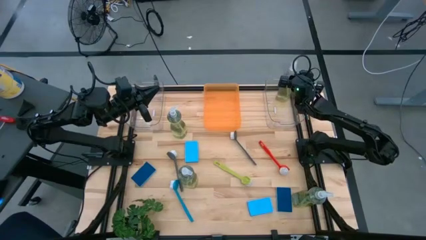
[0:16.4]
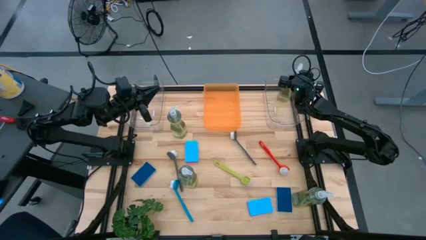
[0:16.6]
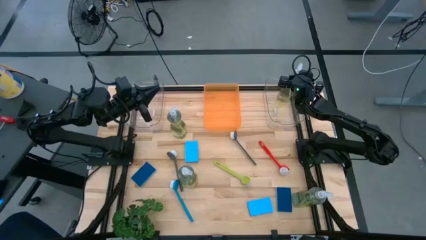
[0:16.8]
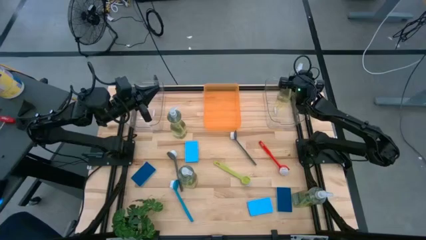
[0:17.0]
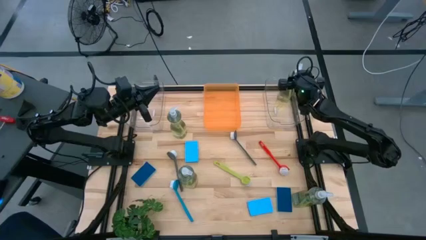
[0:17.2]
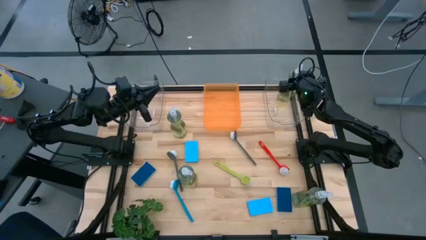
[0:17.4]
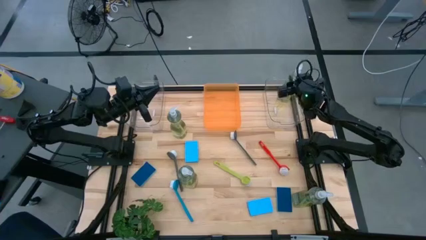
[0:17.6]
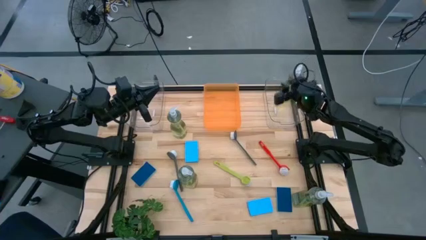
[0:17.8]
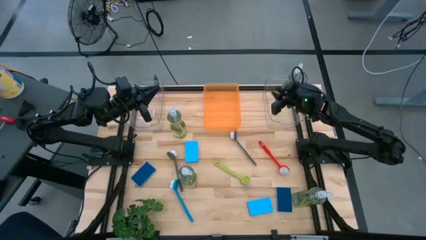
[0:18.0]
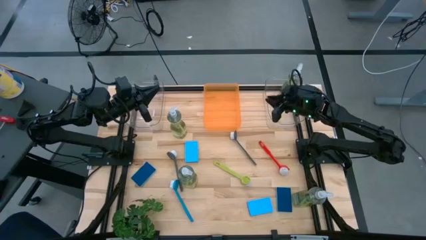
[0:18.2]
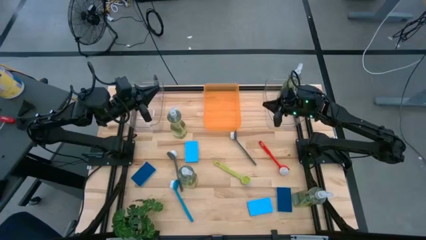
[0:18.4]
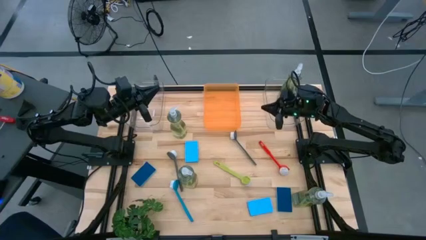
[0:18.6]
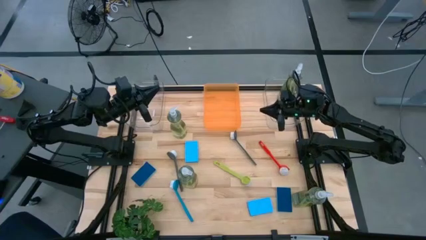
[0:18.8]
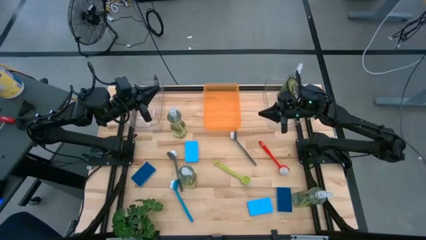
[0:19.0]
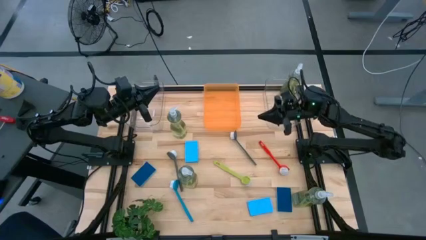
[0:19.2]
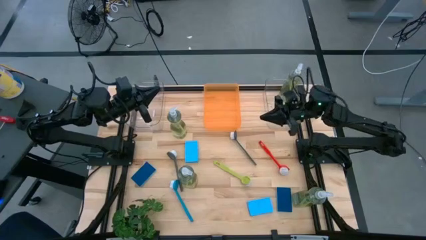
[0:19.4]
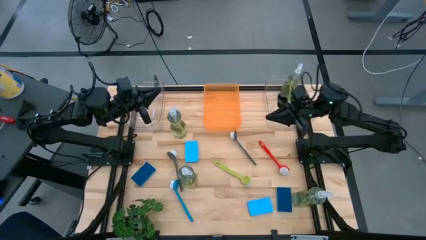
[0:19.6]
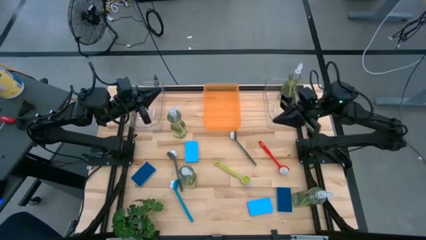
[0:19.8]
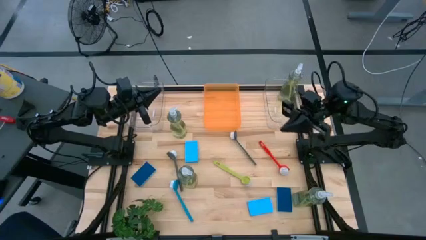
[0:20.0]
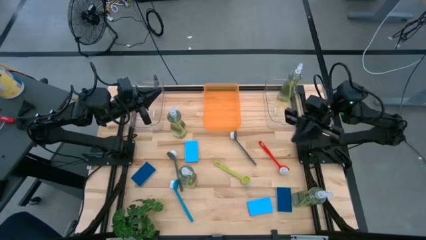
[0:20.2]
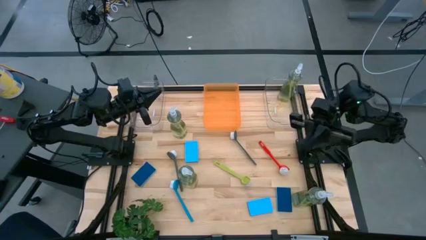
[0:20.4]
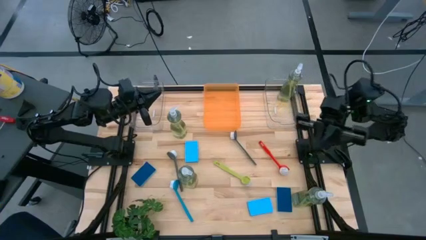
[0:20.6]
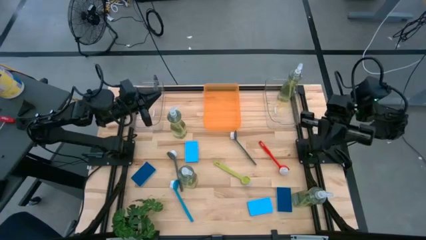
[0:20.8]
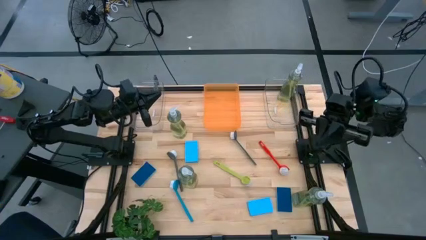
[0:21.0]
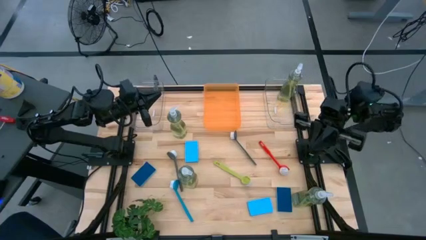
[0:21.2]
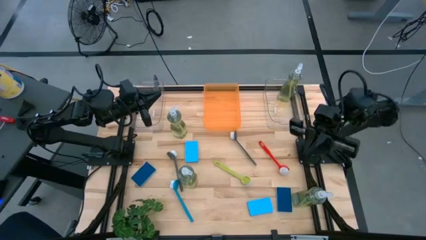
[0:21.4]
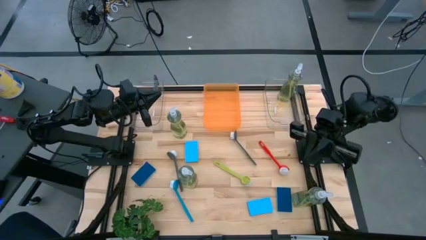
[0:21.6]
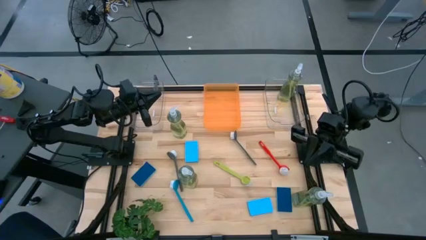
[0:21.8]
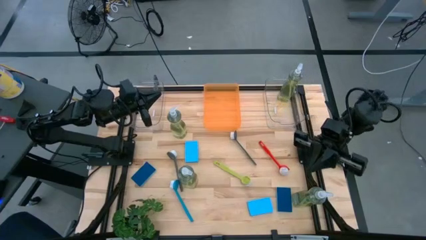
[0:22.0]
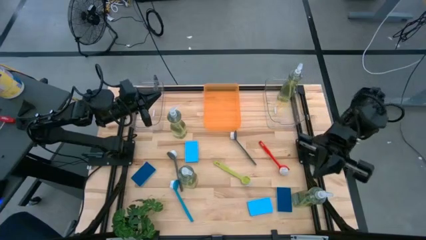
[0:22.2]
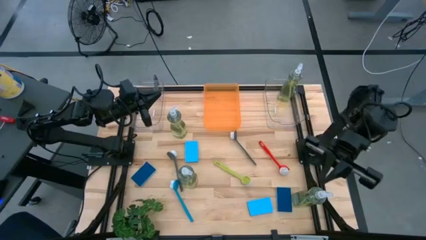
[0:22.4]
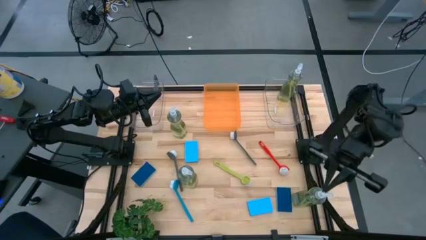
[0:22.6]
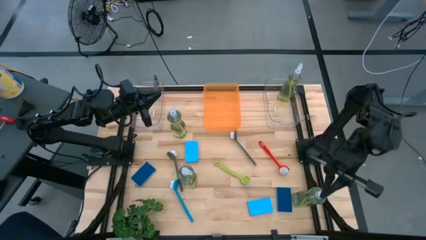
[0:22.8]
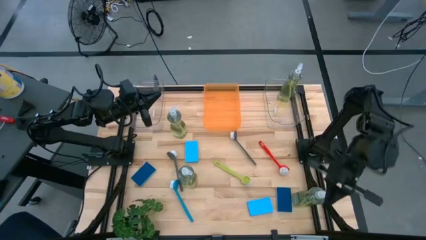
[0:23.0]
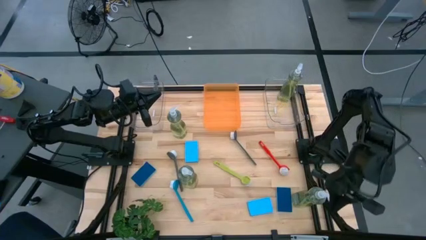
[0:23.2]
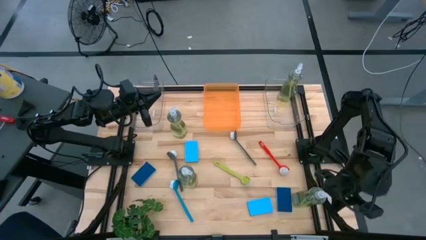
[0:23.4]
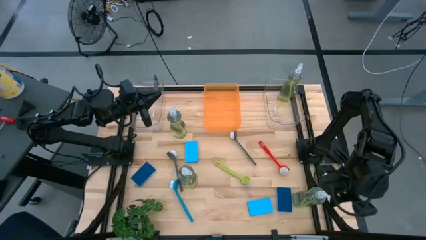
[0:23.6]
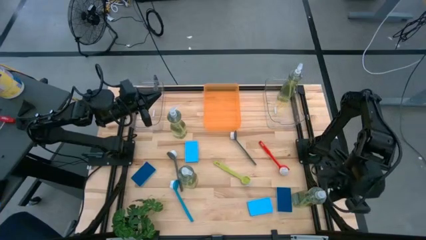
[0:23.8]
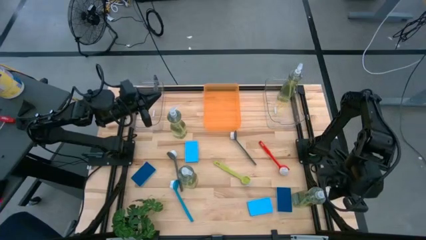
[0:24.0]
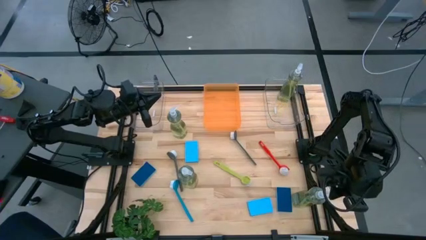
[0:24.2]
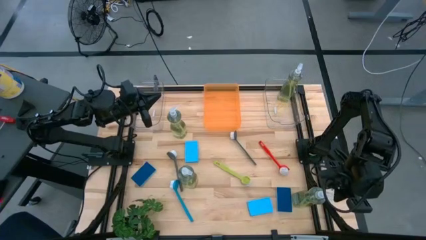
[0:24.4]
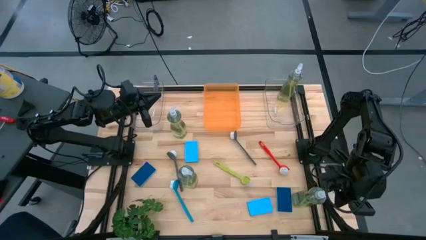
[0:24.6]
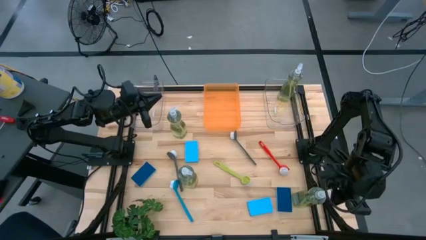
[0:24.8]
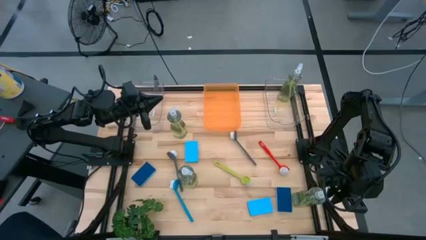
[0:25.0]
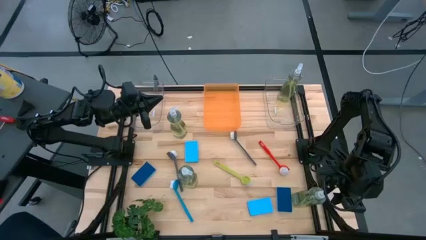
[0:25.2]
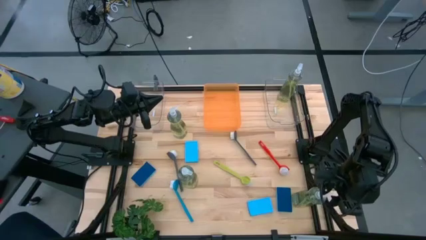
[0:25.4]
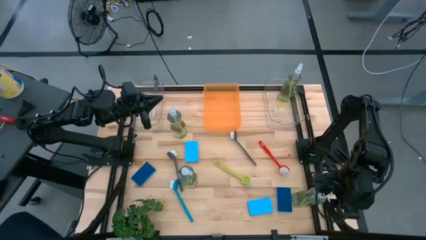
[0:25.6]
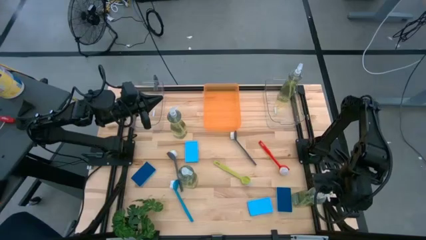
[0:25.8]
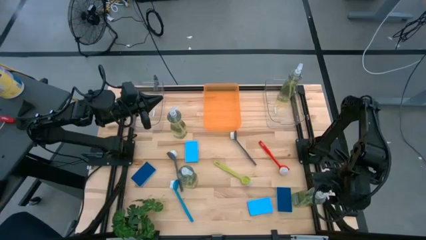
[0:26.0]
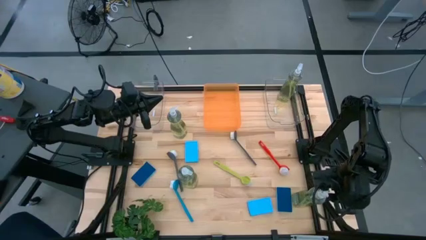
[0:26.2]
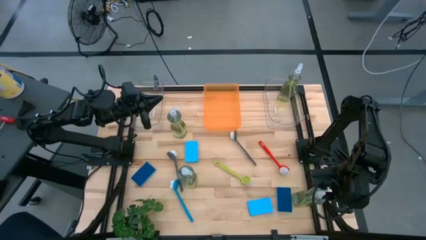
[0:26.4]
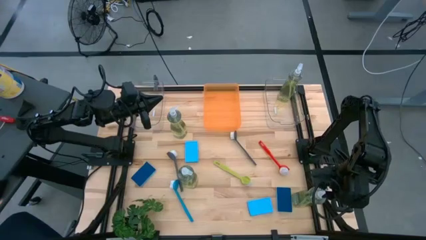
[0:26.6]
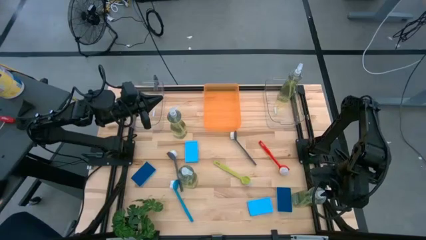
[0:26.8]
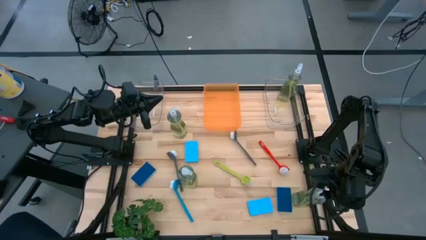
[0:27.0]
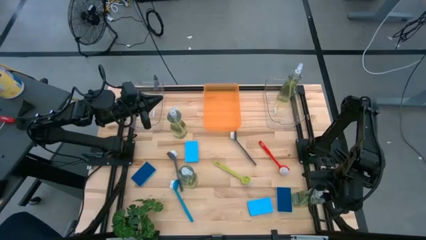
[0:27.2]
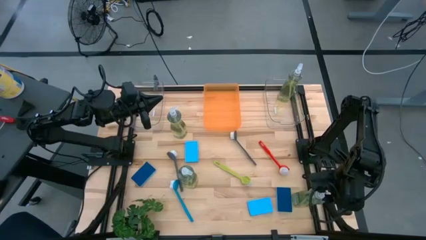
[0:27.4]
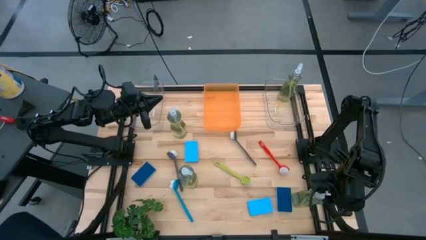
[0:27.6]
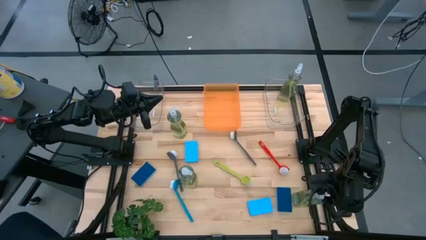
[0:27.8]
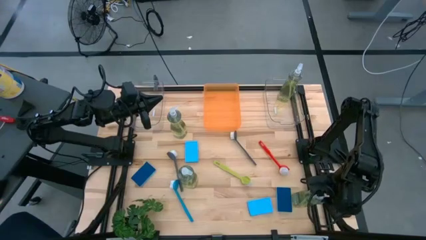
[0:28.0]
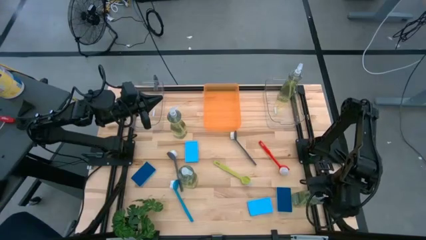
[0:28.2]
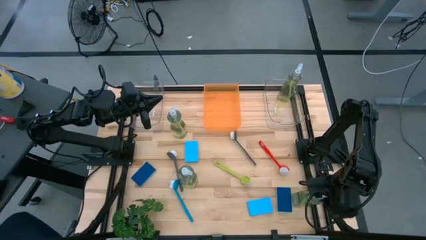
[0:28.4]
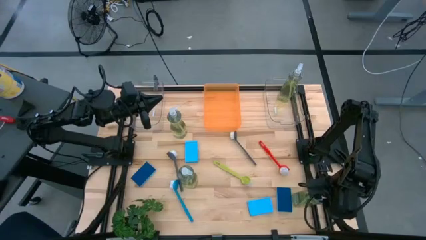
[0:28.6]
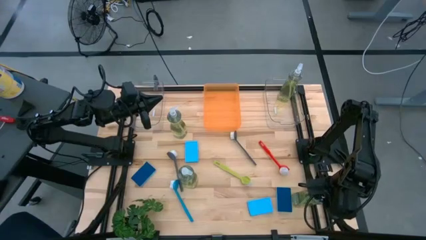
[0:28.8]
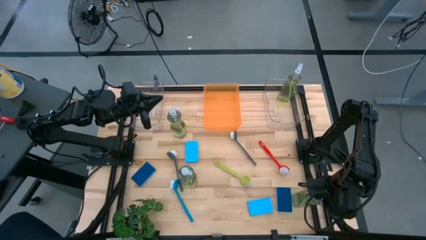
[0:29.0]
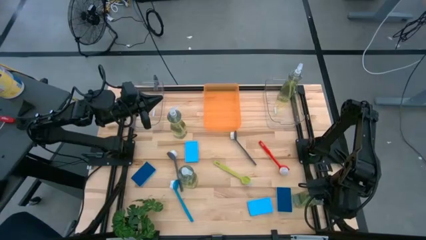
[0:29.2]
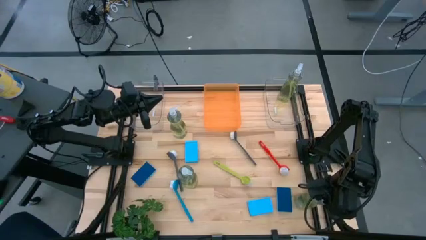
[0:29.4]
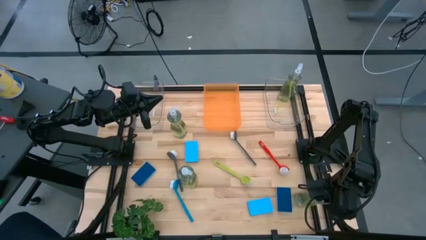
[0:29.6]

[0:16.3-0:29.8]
Task: Pick & Place Kitchen Sink Supplies
Put the yellow dish soap into the right transparent bin

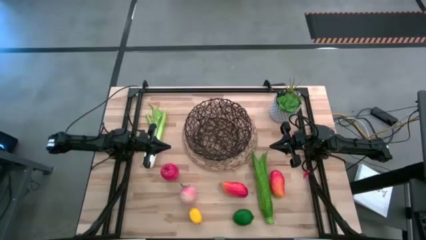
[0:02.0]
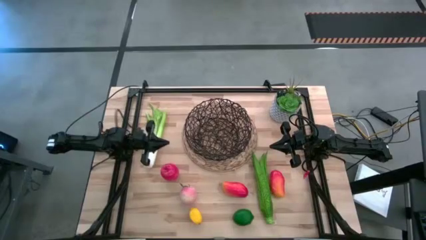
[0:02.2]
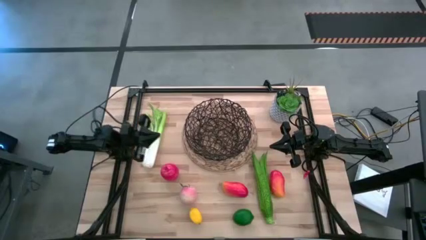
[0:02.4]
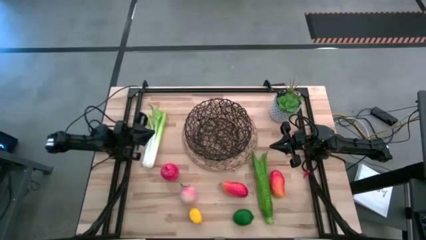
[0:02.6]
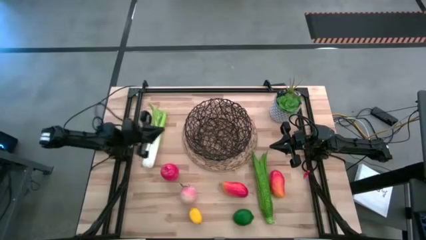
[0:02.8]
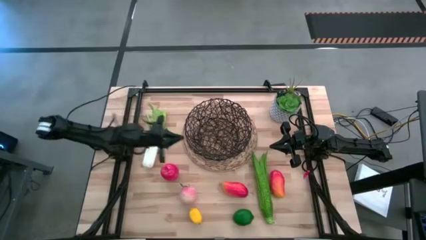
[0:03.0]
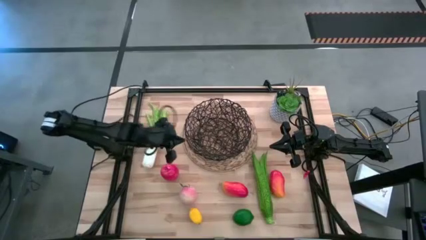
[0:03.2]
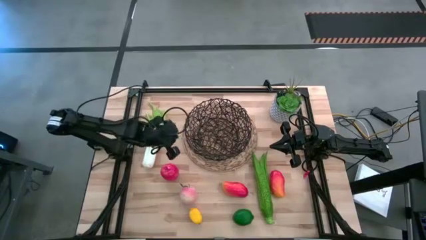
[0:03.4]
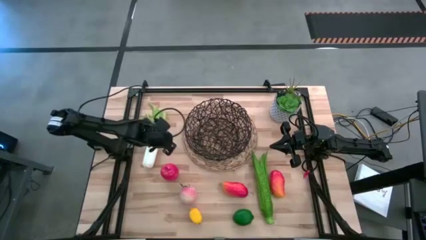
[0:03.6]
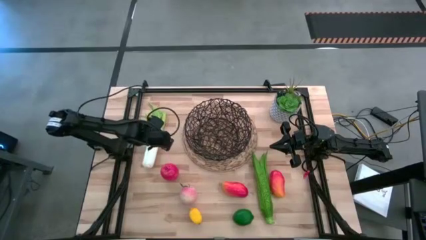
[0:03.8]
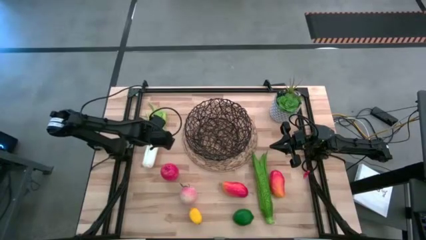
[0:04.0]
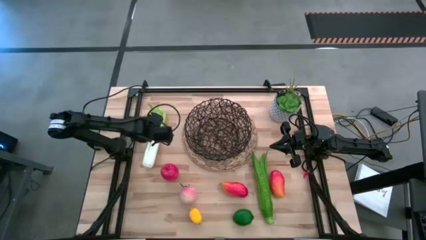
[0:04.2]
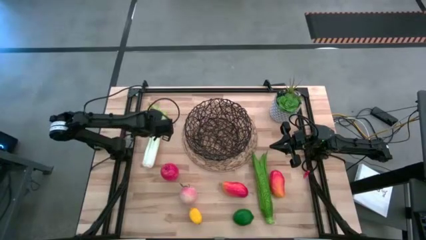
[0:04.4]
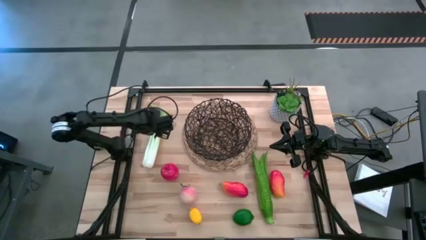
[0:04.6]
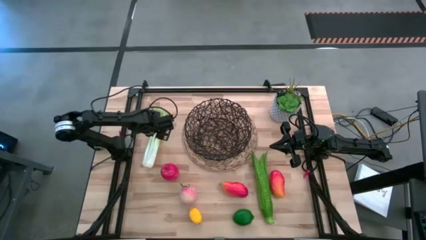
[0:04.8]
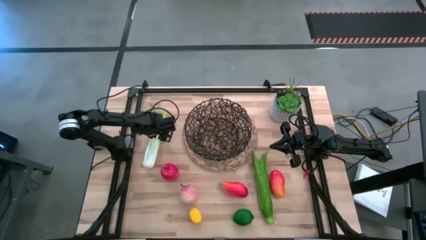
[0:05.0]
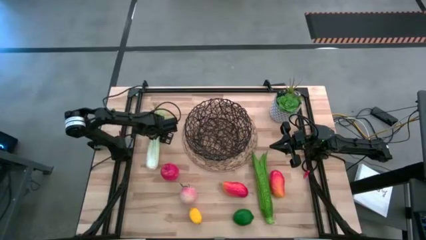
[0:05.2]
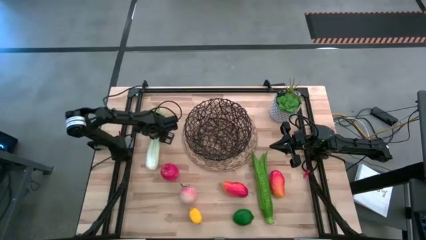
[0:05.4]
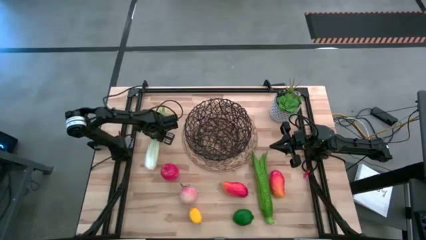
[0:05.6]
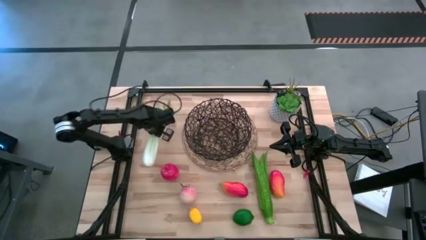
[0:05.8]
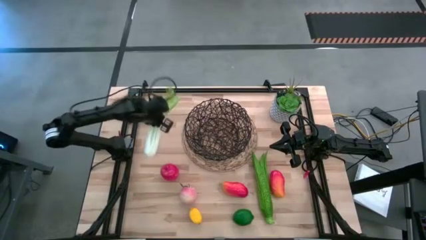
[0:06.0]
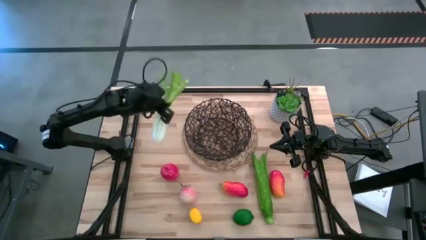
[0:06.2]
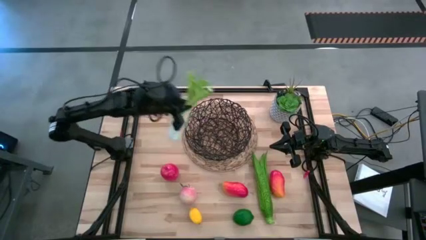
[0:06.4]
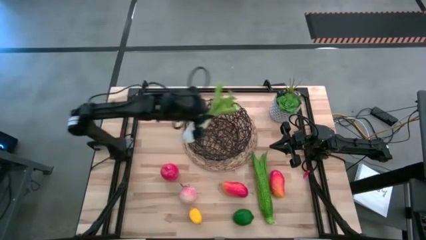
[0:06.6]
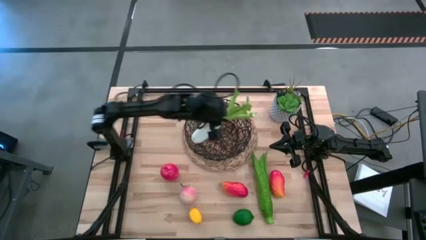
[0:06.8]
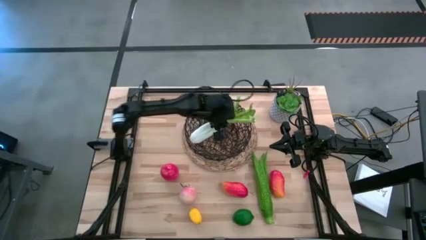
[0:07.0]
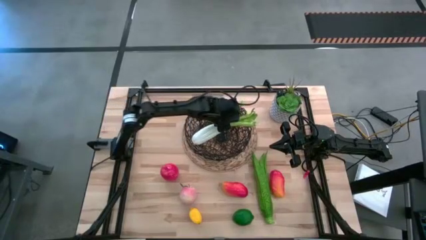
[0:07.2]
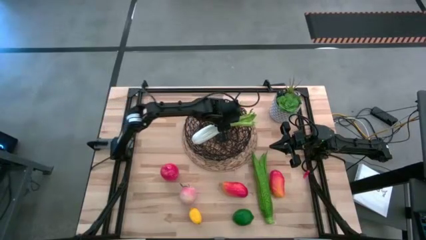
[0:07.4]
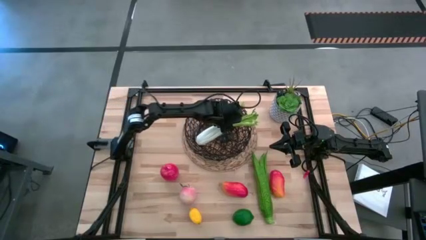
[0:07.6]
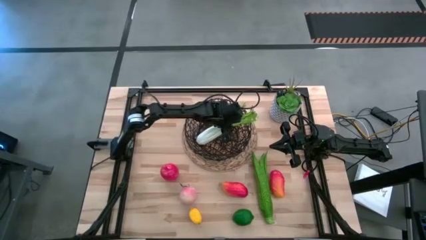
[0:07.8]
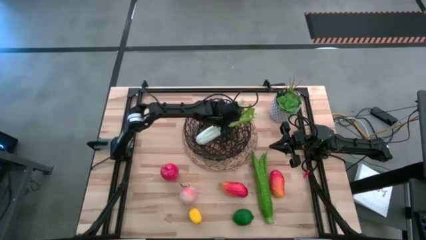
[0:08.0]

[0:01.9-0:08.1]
Task: Build produce basket
Put the green celery into the black mesh basket
